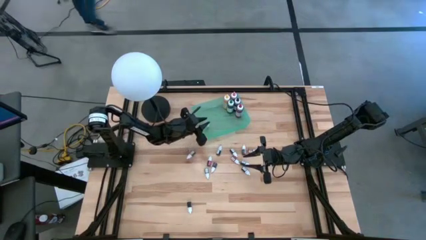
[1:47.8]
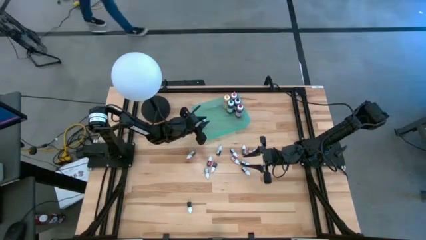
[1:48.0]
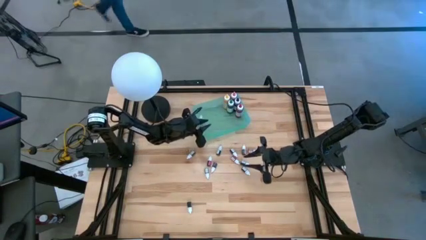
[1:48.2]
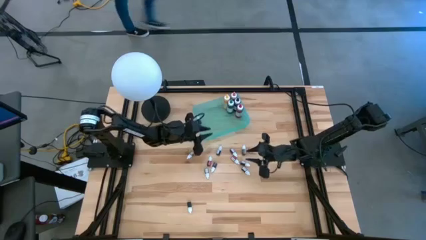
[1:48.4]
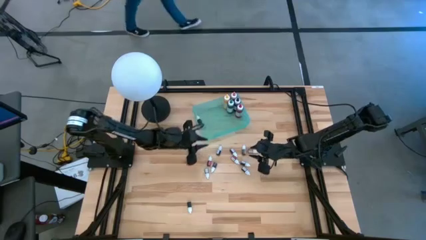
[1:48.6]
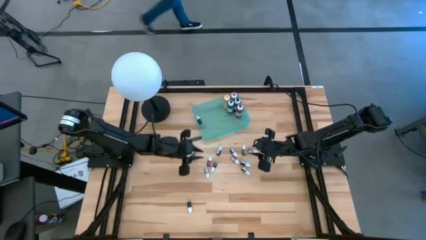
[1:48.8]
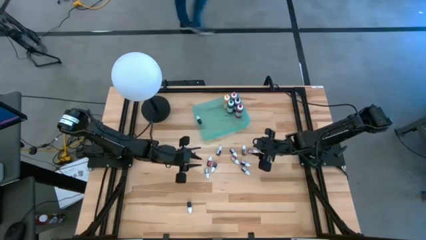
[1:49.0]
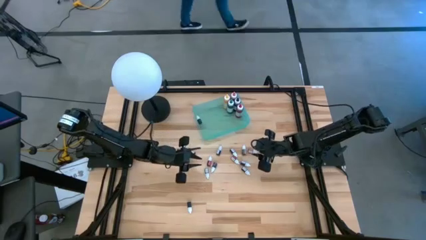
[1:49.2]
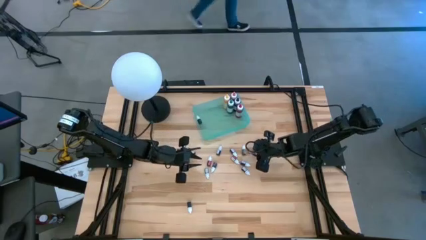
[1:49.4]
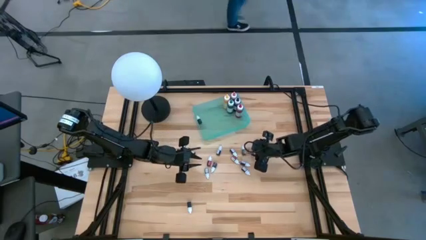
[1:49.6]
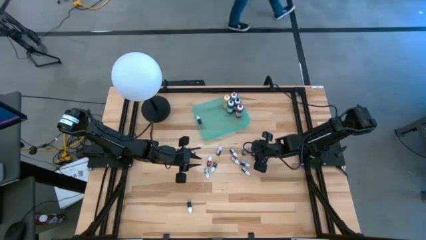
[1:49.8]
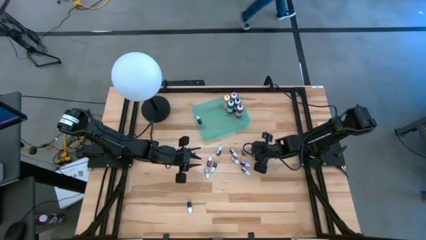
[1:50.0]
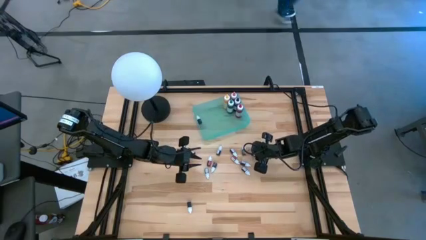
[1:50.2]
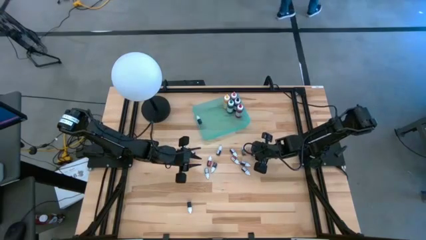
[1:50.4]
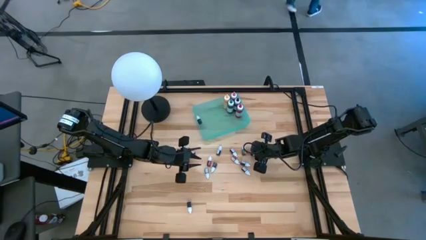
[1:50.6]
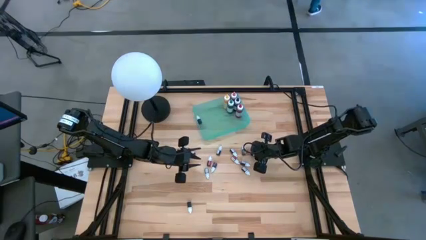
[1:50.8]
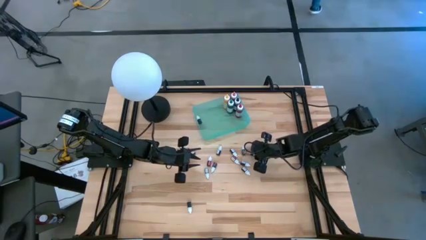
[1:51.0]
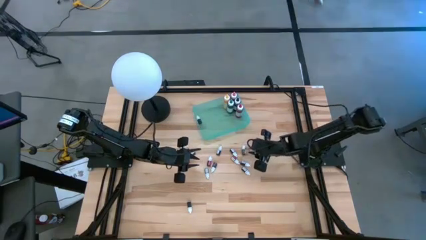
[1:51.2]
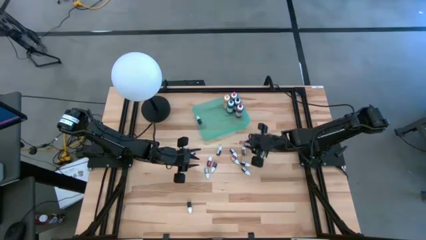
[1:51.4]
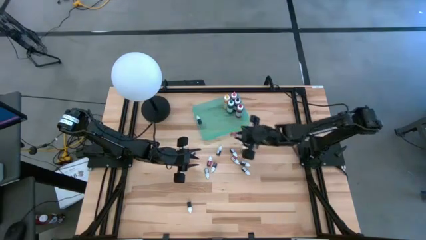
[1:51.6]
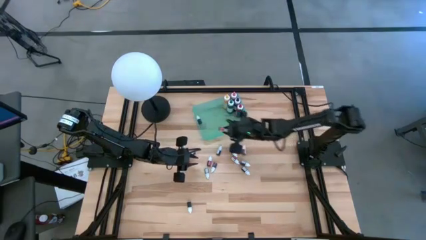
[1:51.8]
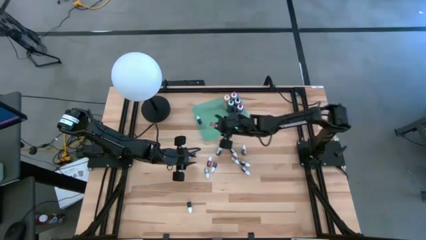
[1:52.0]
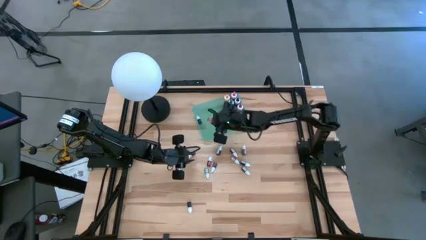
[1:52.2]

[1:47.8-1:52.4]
Task: Pick & Place food coloring
Put the orange food coloring bottle into the green bin

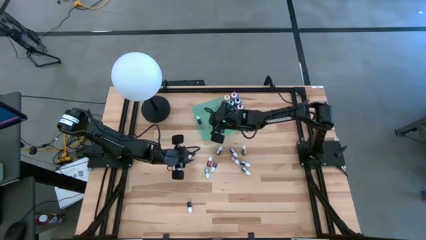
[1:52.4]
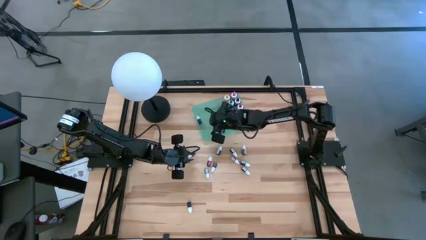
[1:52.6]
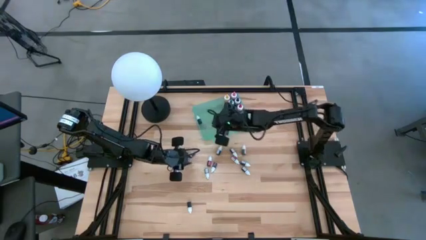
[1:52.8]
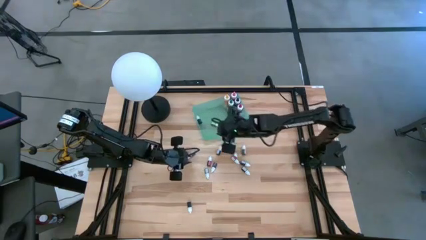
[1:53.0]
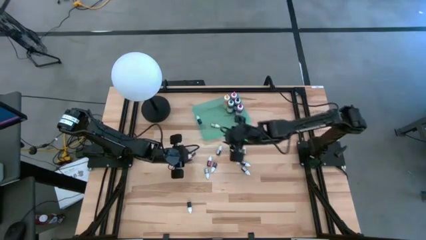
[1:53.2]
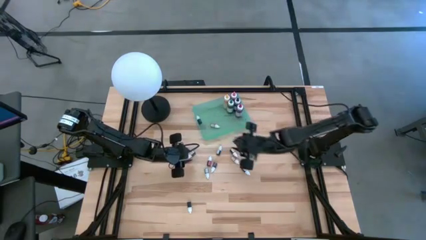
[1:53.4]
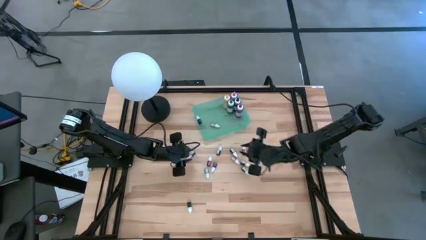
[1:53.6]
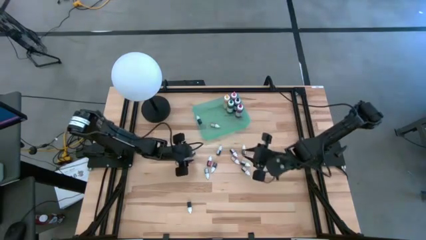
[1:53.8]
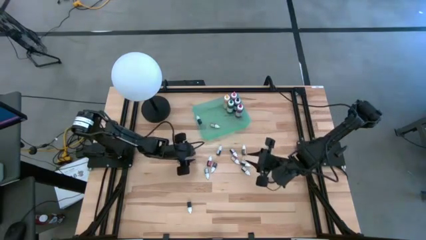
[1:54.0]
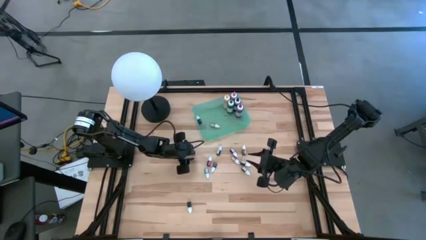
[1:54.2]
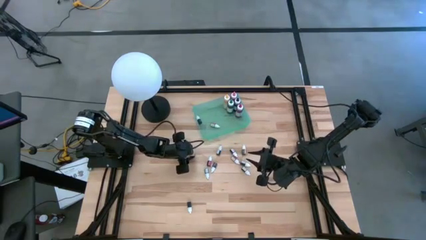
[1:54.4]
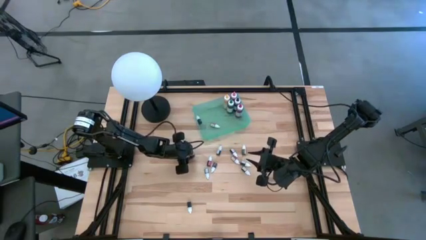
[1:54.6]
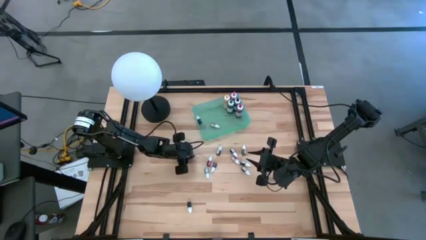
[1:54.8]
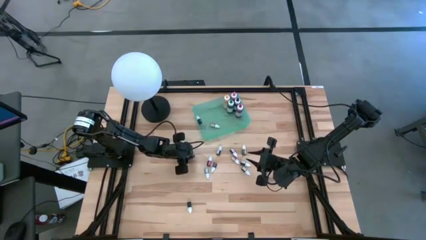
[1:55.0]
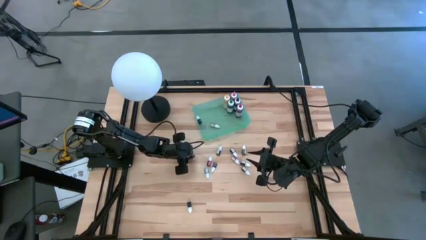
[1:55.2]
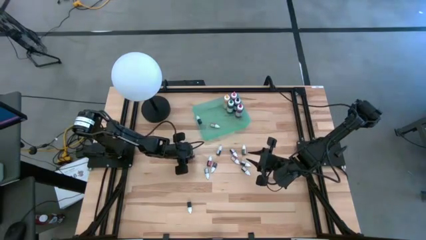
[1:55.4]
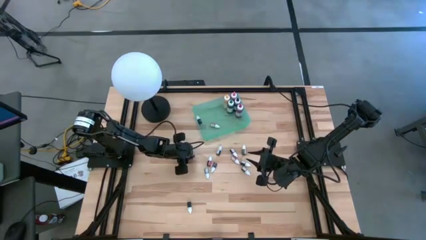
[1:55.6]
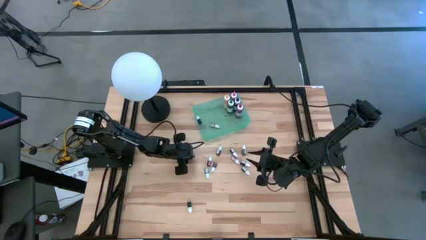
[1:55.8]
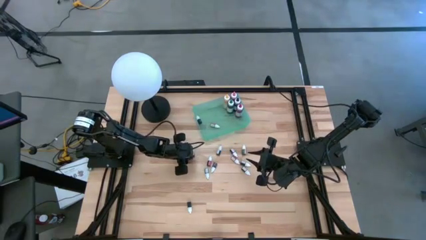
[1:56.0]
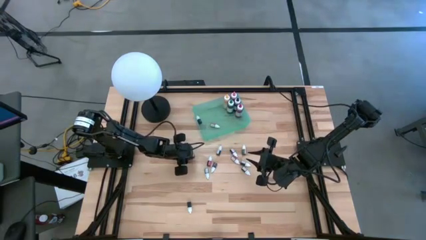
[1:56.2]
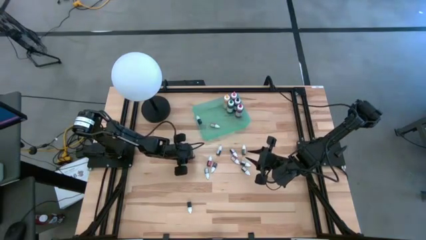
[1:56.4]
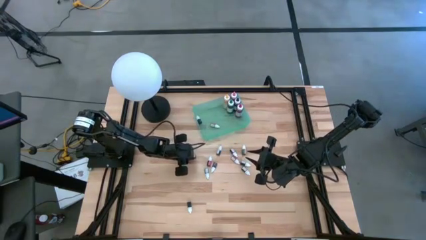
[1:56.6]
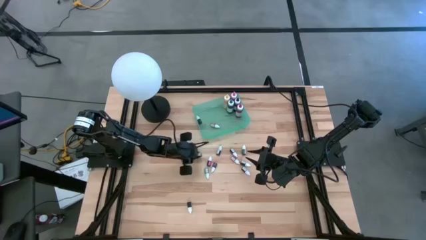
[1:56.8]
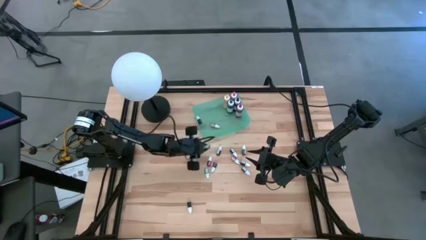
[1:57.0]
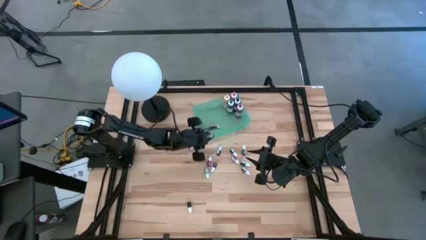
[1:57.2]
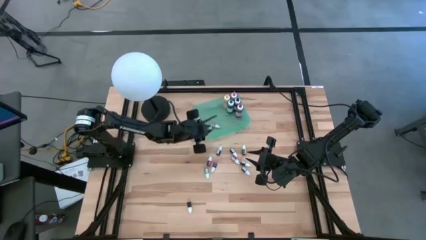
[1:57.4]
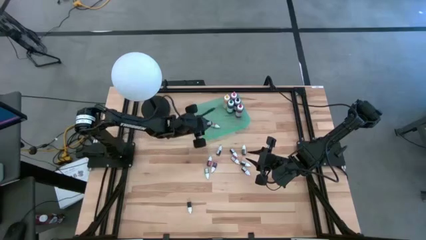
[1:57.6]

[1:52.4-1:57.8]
Put the black food coloring bottle into the green bin

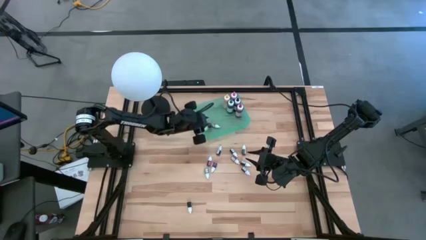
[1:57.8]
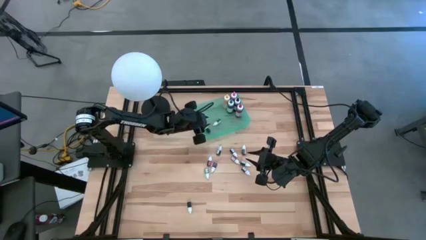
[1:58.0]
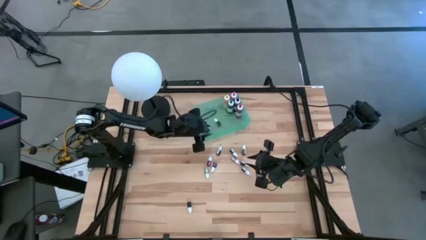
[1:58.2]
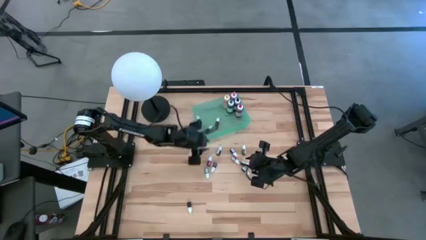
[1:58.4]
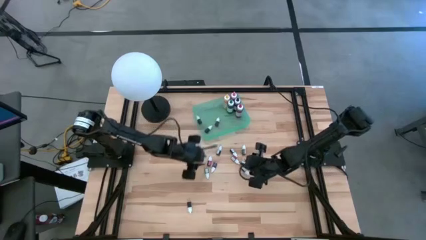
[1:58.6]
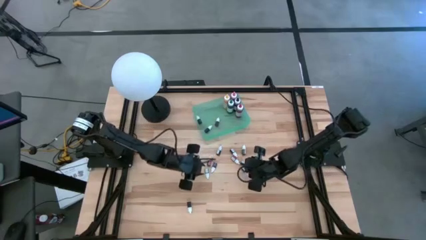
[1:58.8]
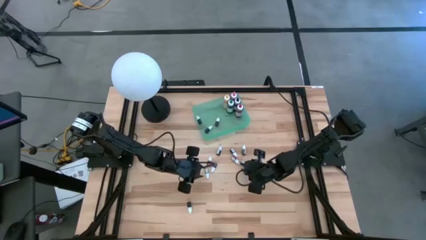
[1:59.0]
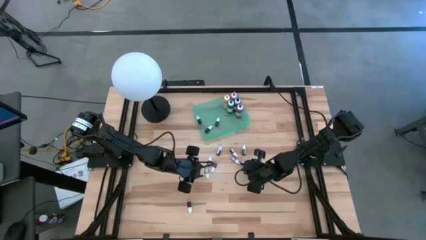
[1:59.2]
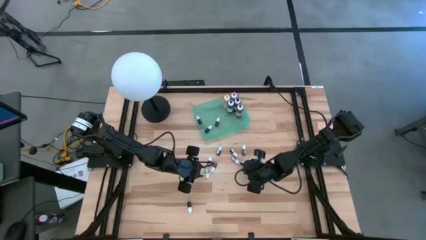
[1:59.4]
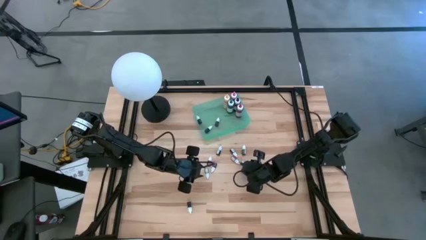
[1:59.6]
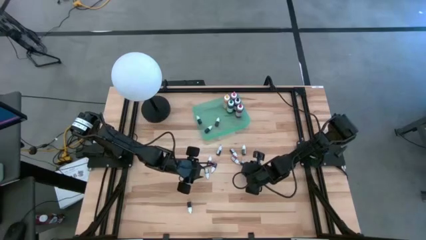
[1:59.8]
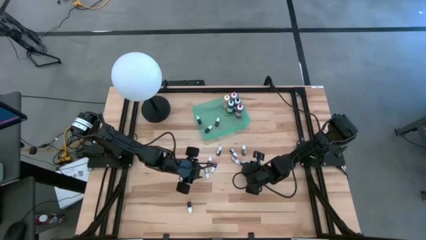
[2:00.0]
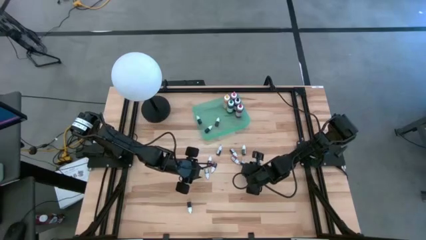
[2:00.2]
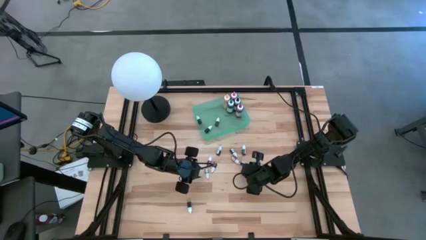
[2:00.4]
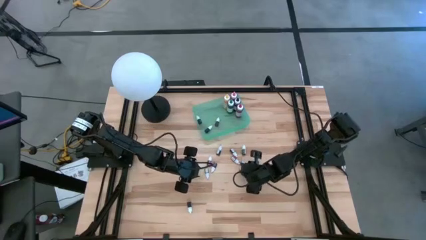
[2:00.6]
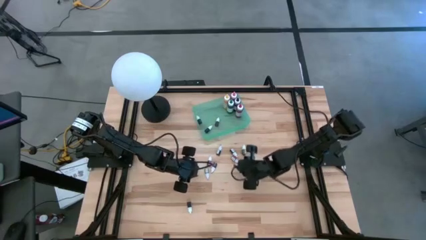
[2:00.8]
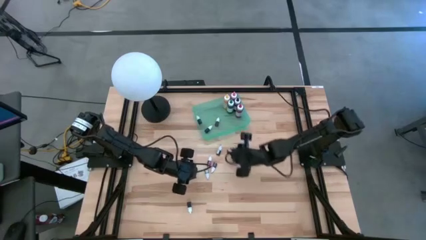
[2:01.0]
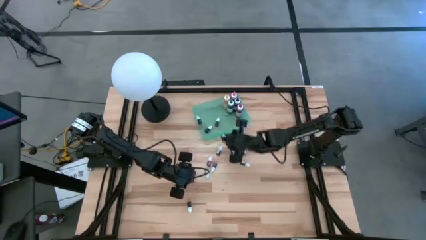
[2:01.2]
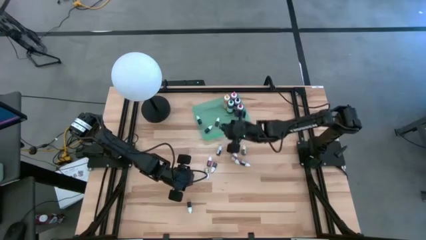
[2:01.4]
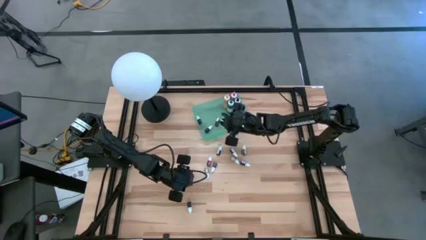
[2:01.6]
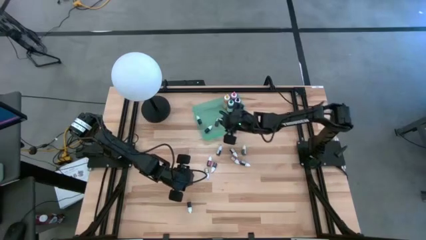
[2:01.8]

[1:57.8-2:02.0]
Put the violet food coloring bottle into the green bin

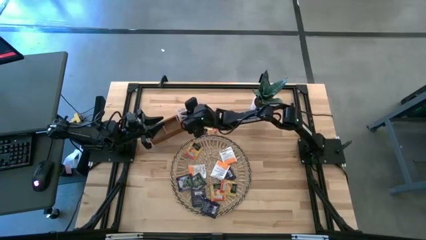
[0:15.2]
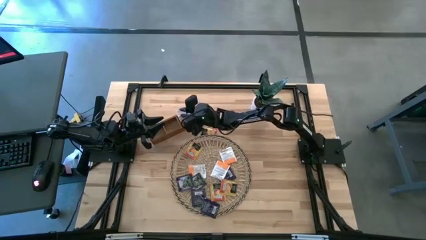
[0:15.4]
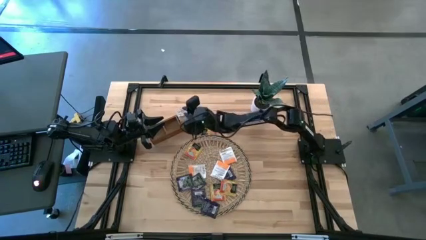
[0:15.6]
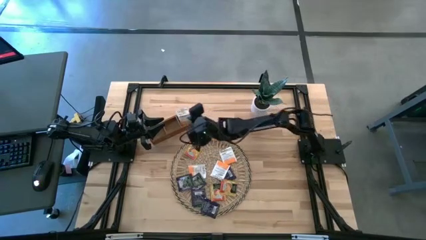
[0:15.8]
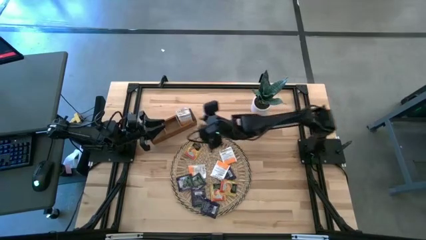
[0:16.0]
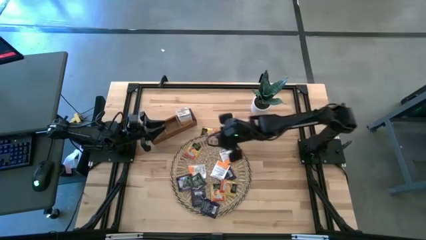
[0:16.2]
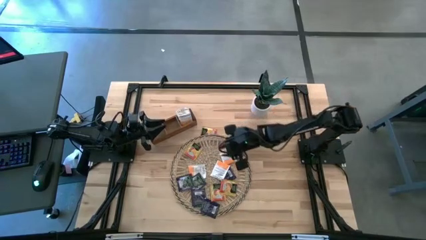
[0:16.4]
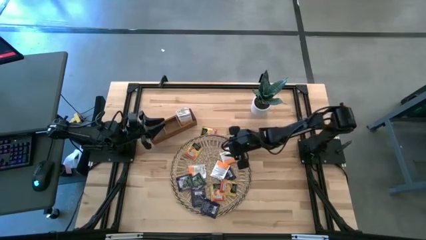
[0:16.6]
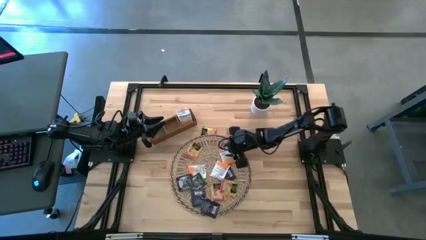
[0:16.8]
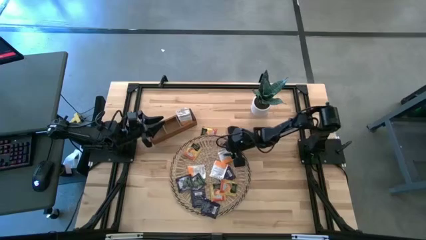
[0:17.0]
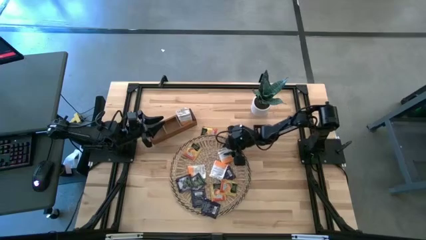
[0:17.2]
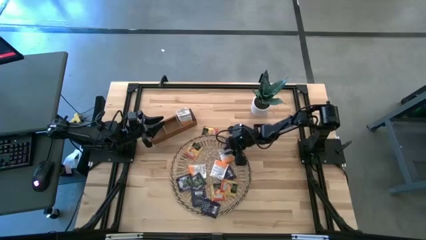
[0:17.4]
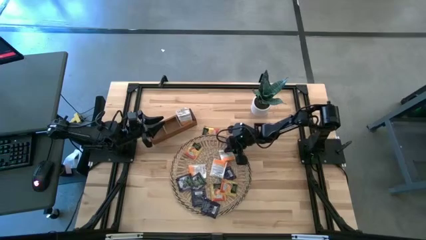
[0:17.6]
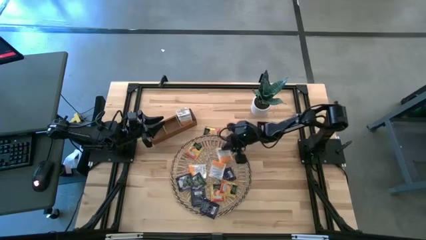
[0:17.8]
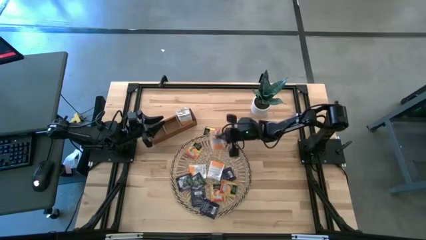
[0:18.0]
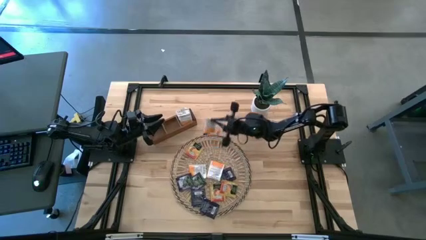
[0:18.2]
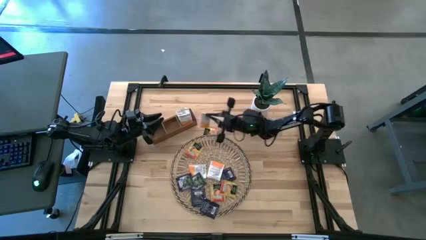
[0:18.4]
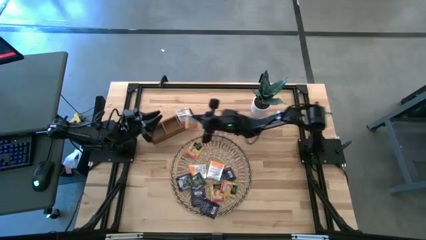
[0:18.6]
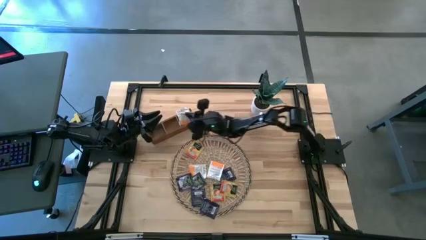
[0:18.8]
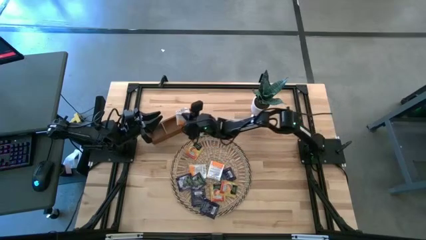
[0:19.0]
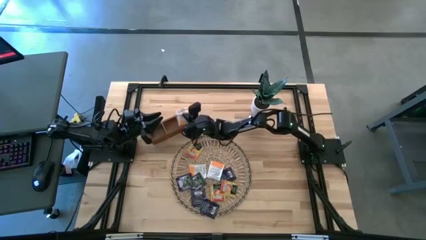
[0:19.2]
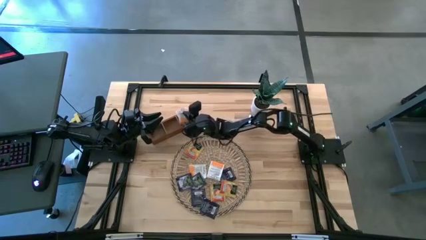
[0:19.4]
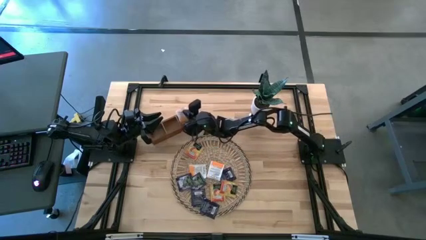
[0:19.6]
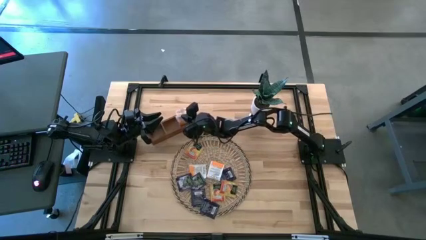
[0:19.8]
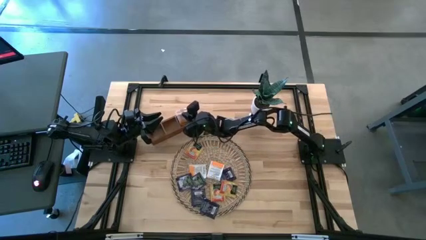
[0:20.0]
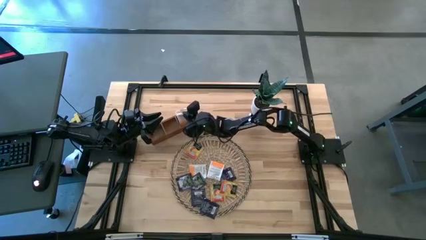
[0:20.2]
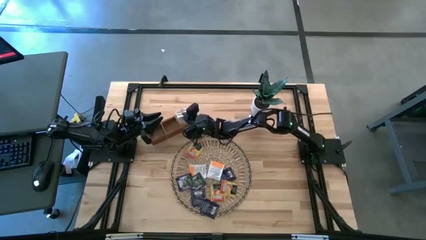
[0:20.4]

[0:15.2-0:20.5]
Task: Pick & Place Tea
Put the right white tea bag into the right compartment of the wooden organizer
